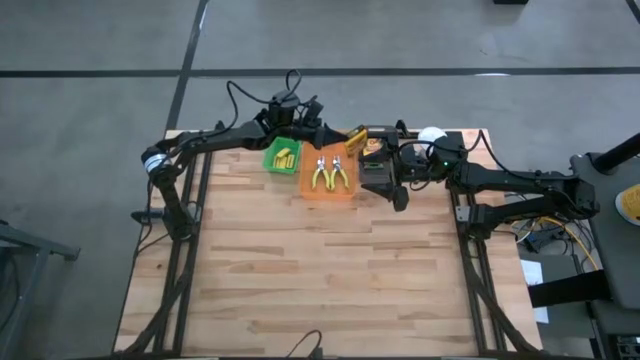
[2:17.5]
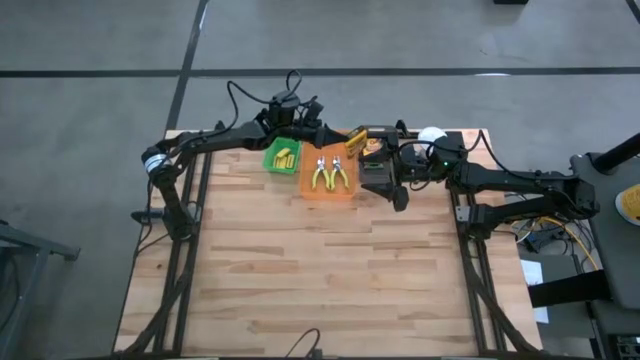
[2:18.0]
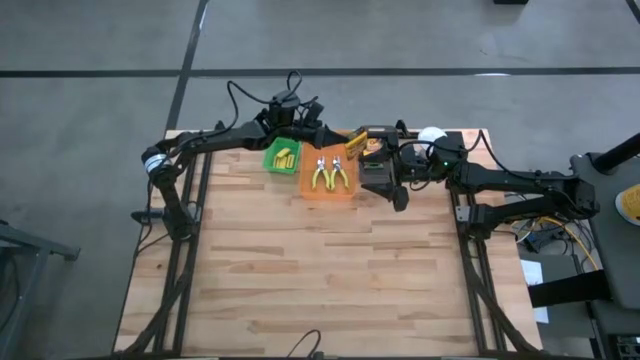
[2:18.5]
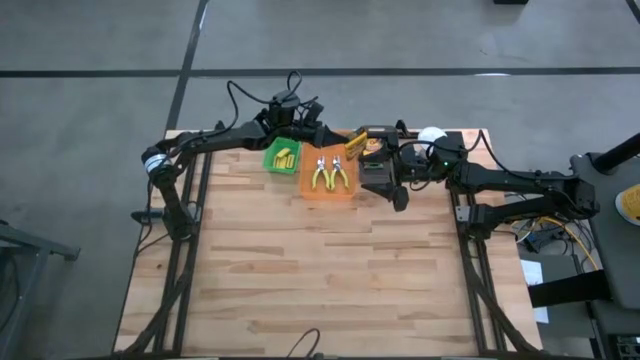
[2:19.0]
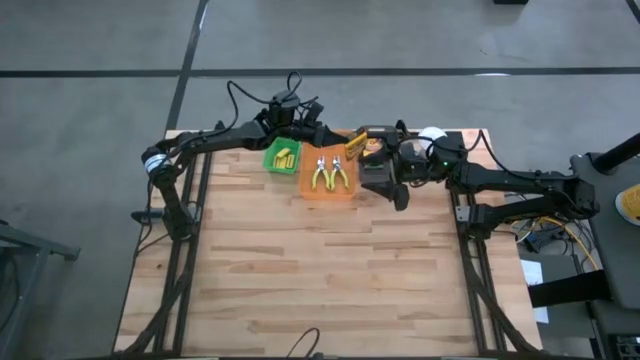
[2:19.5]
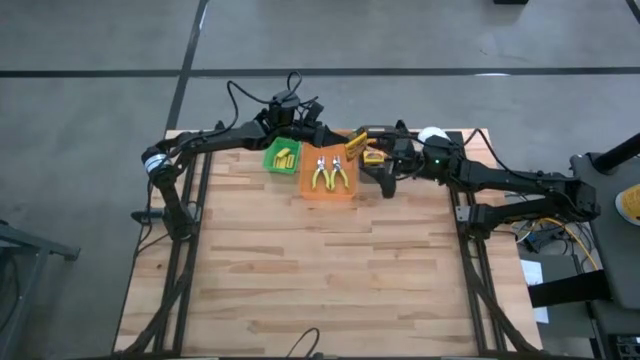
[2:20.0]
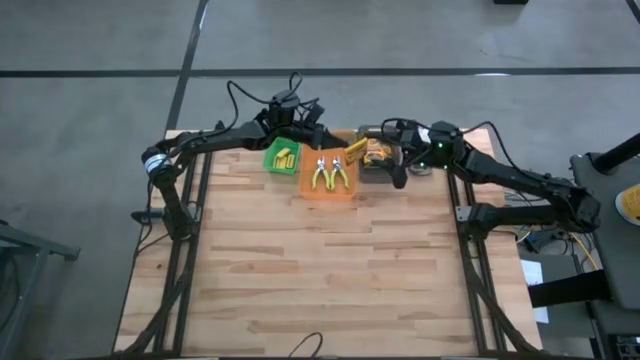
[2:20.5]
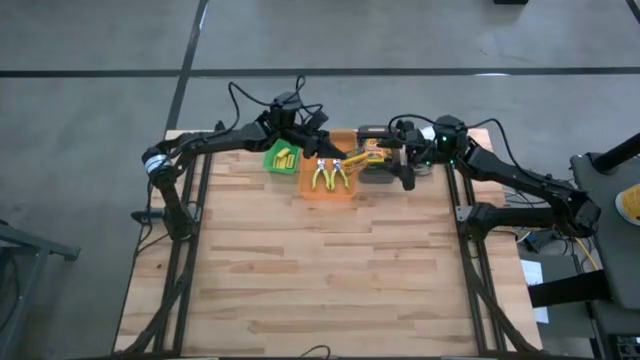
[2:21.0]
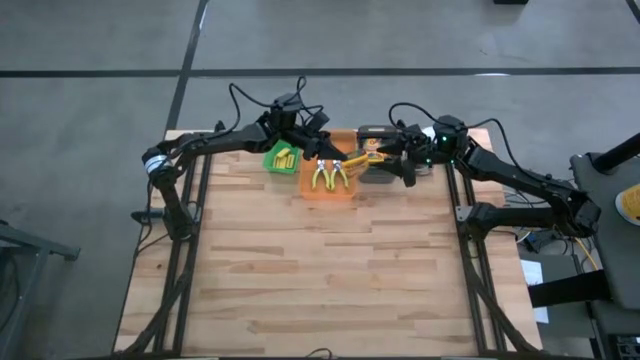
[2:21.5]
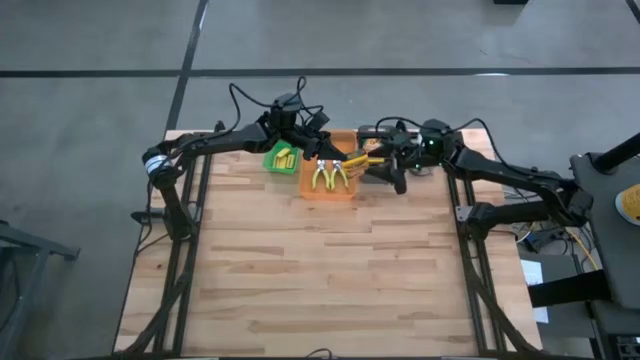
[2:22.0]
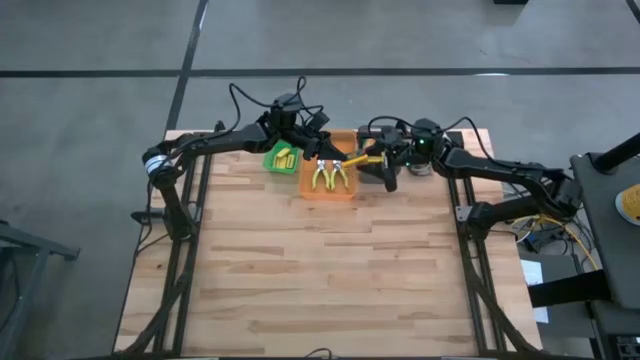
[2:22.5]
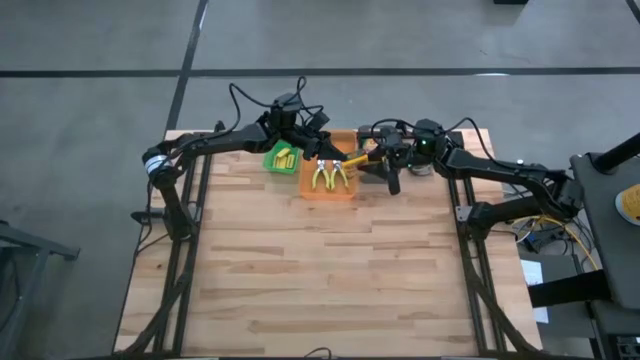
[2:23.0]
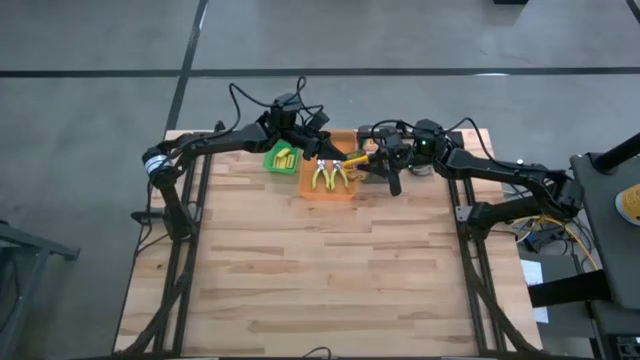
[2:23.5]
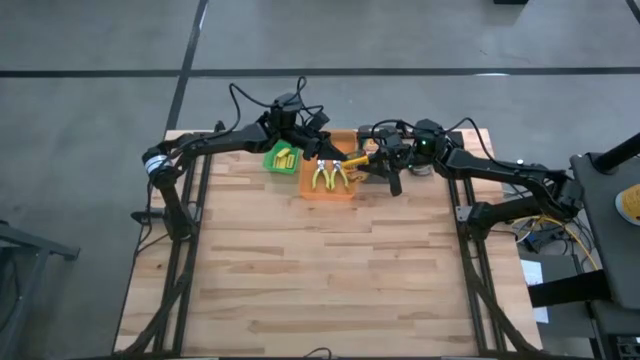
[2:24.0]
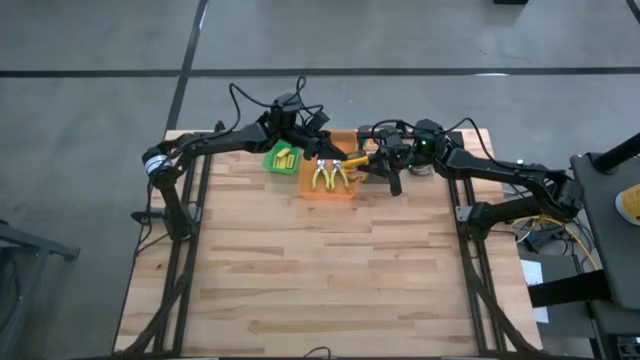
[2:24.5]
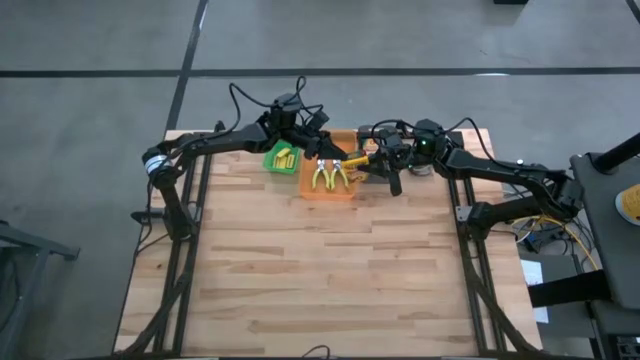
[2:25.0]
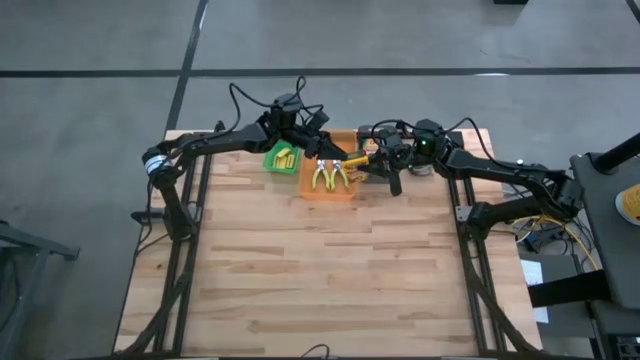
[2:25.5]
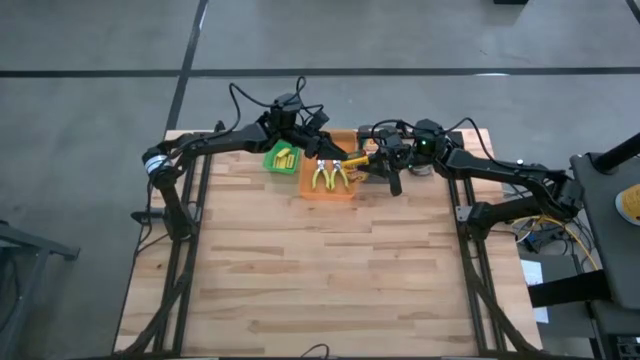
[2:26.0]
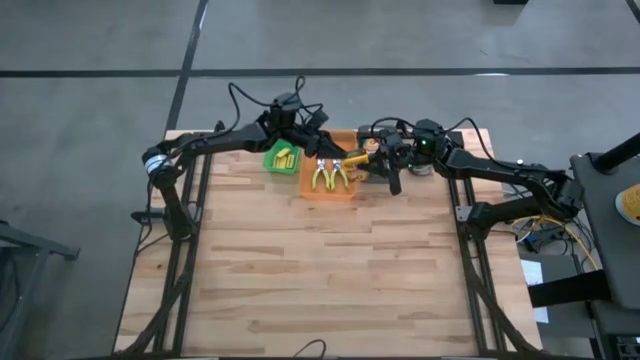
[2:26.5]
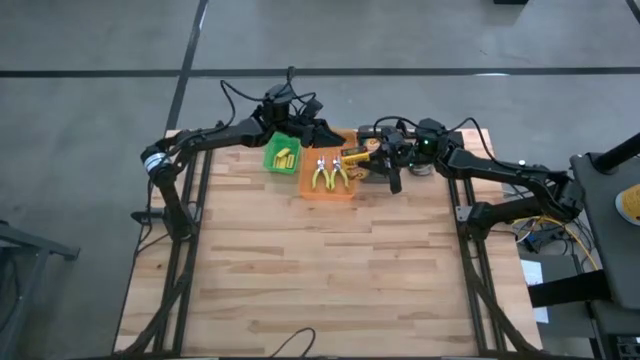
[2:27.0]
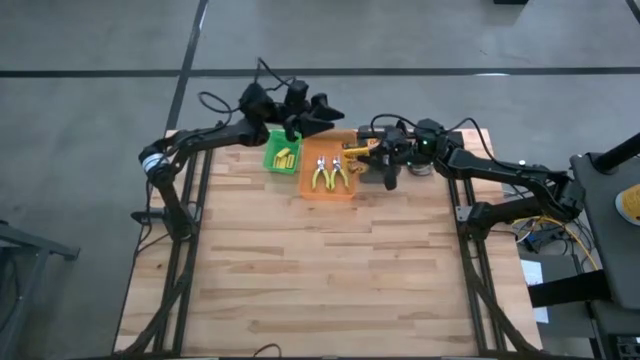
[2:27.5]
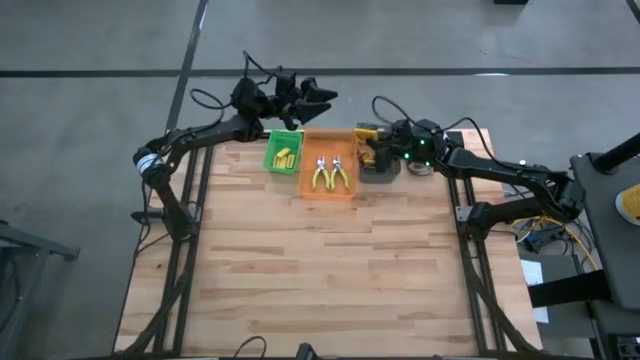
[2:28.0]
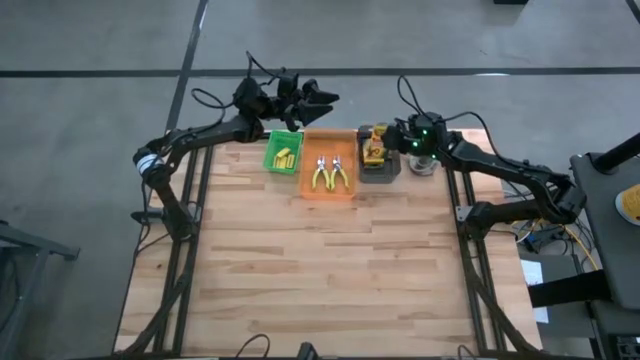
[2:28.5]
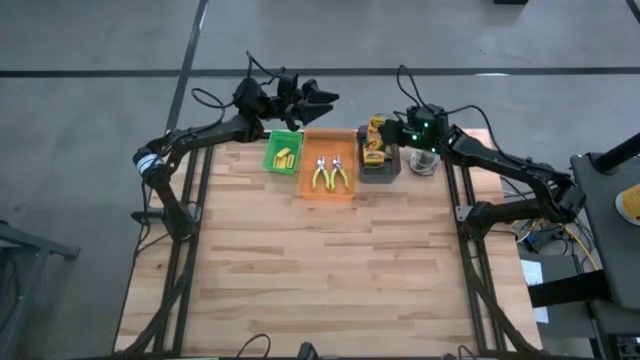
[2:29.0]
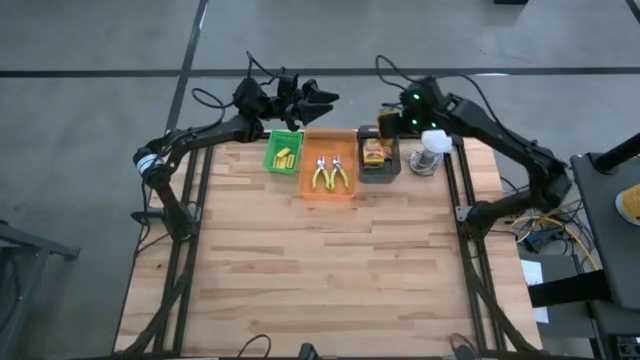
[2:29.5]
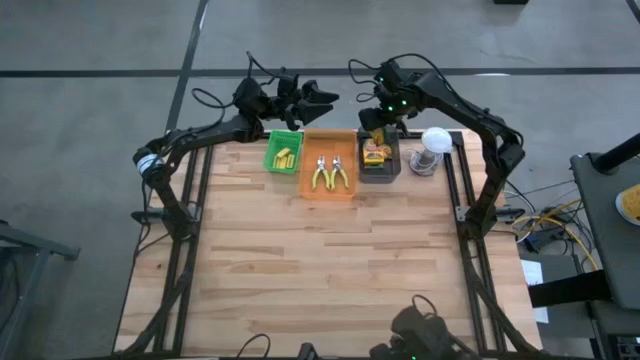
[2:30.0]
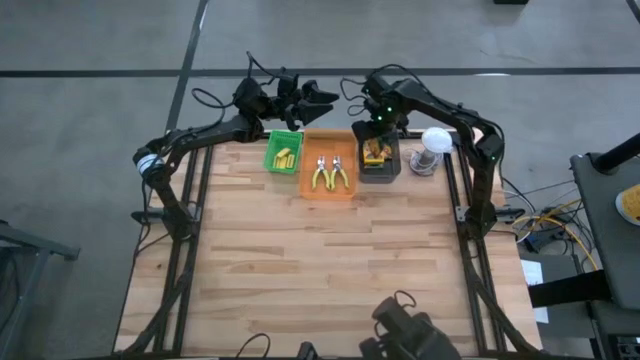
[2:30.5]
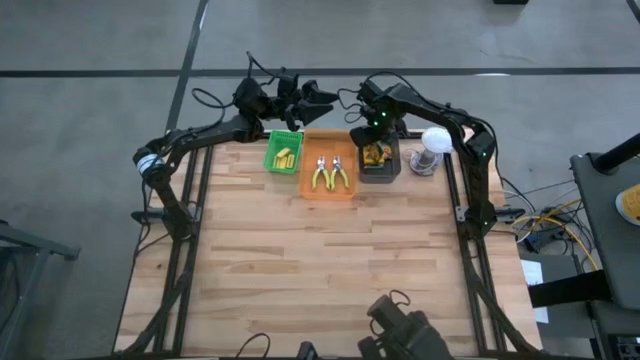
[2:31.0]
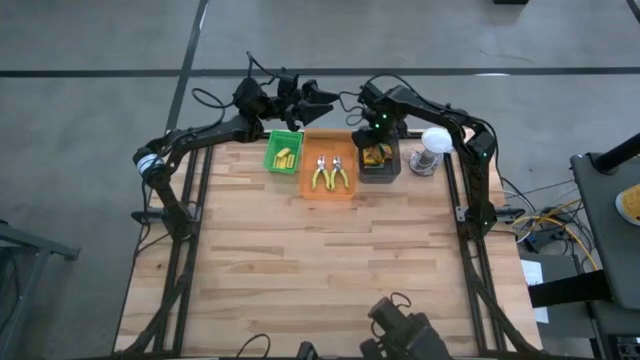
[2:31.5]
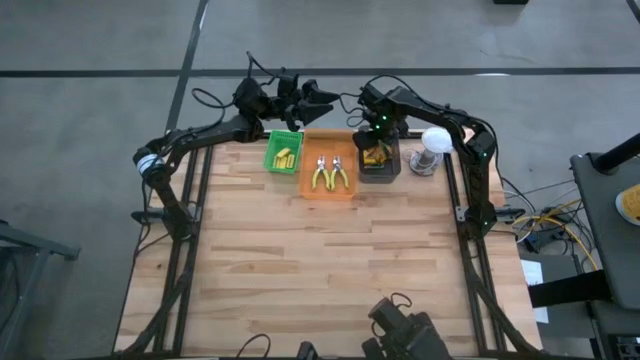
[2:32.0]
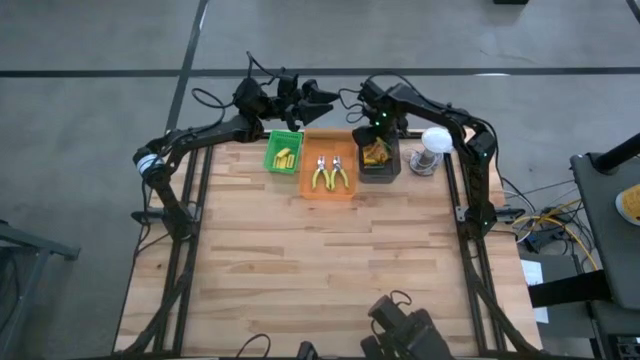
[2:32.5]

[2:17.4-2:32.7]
Task: Pick & Place School Supplies
Put the yellow crayon box into the black bin

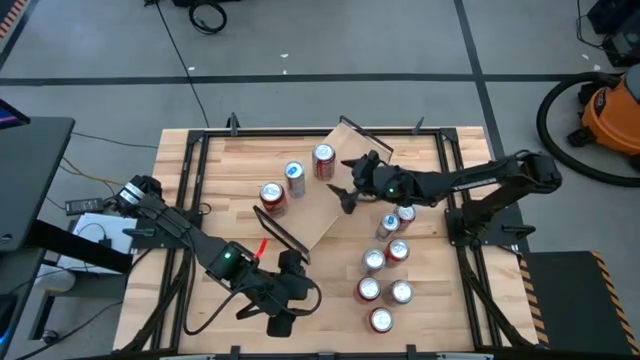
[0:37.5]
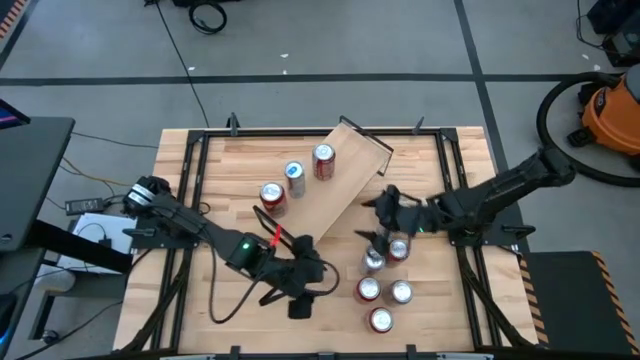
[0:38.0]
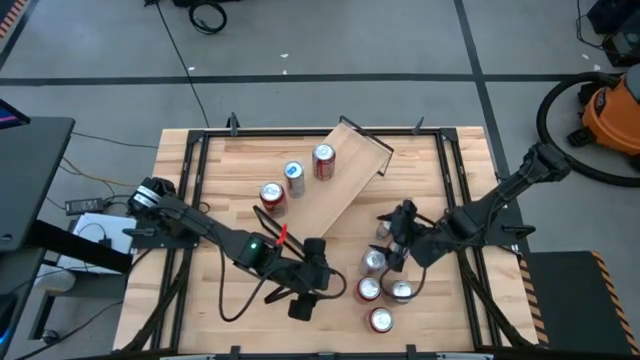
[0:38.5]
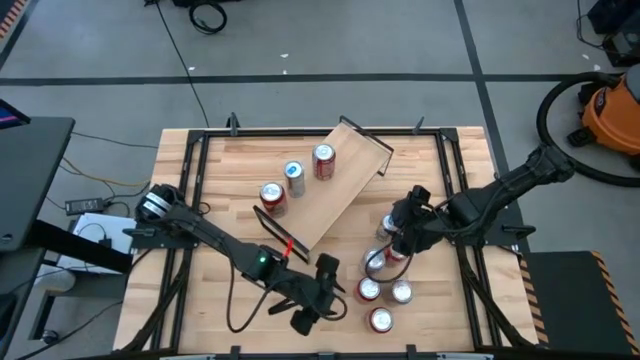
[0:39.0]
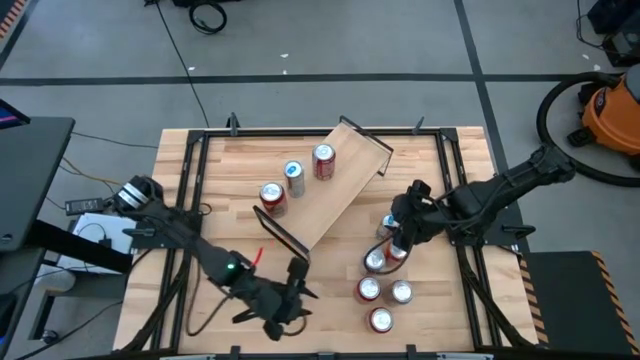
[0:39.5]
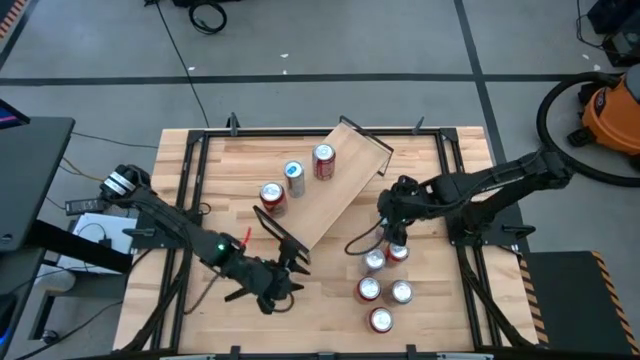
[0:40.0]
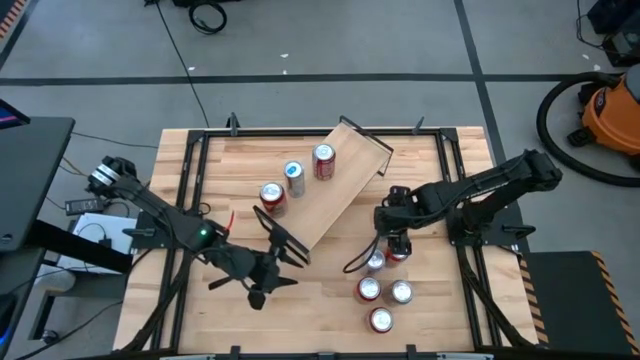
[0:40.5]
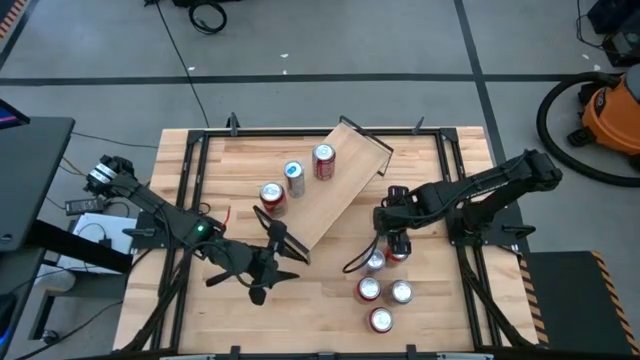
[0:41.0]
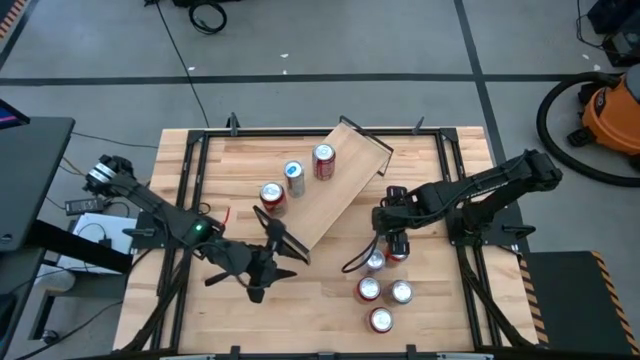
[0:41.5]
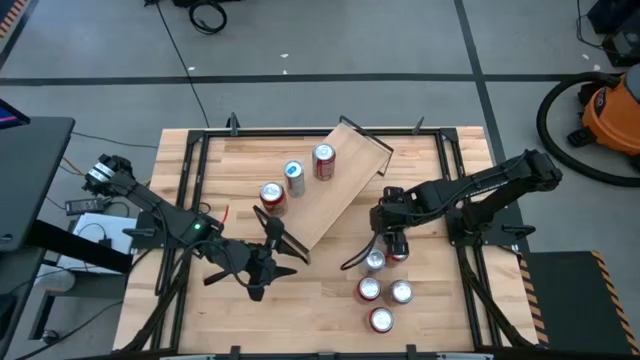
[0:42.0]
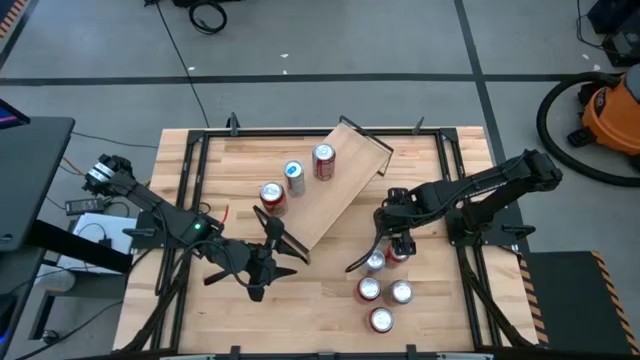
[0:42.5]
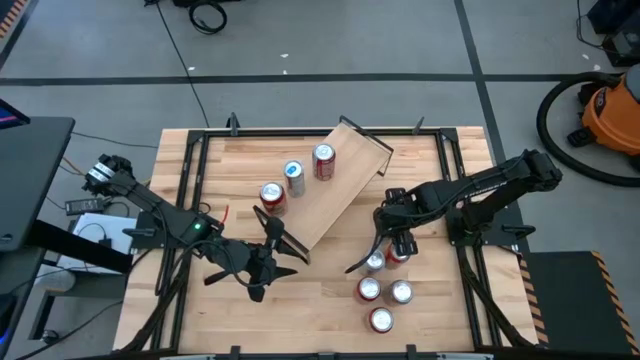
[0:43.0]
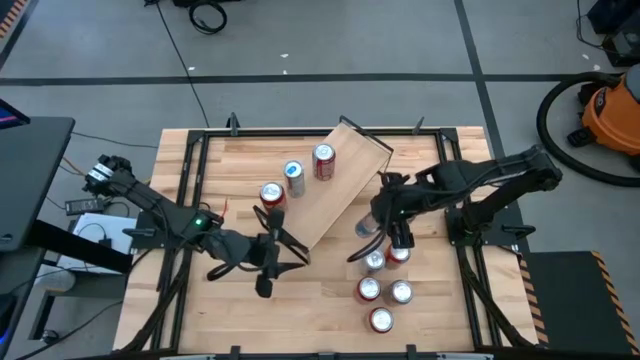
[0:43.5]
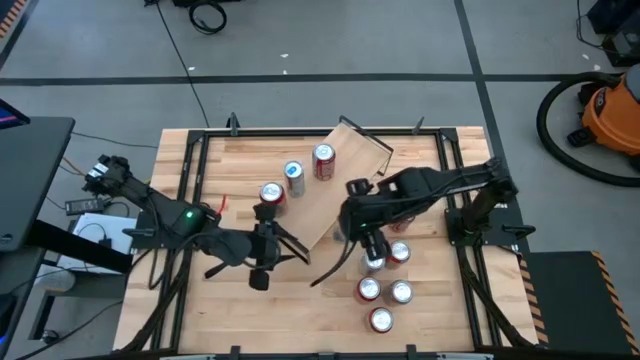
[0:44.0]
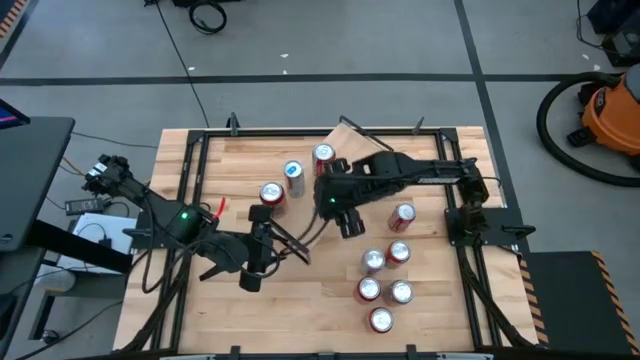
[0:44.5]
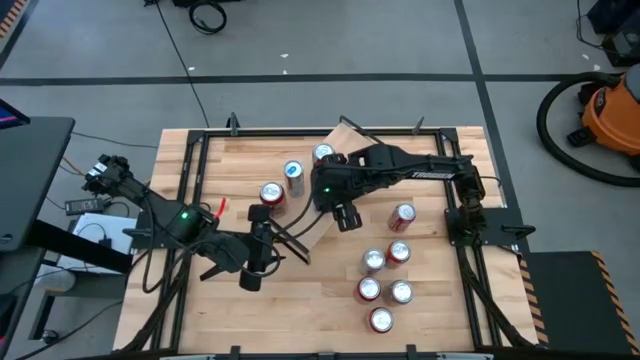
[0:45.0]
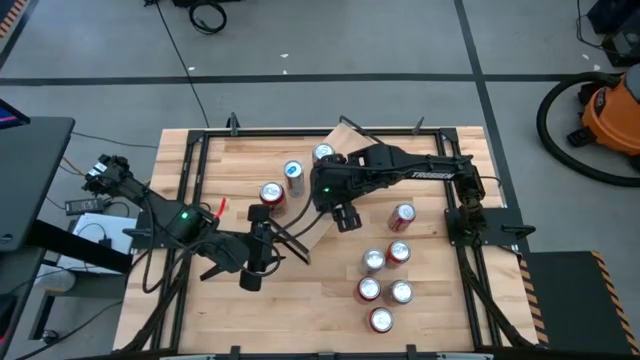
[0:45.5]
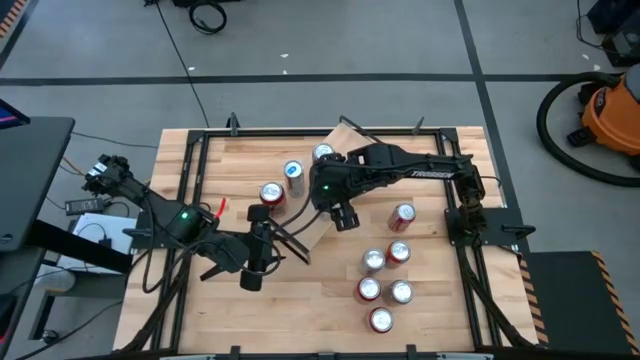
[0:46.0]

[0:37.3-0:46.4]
Task: Place canned beverage on shelf
Put the blue soda can on the shelf aligned with the other blue soda can
